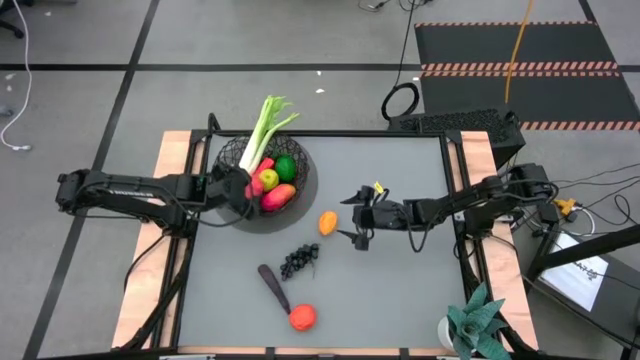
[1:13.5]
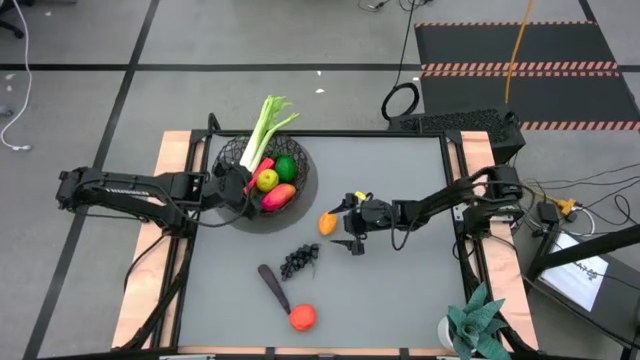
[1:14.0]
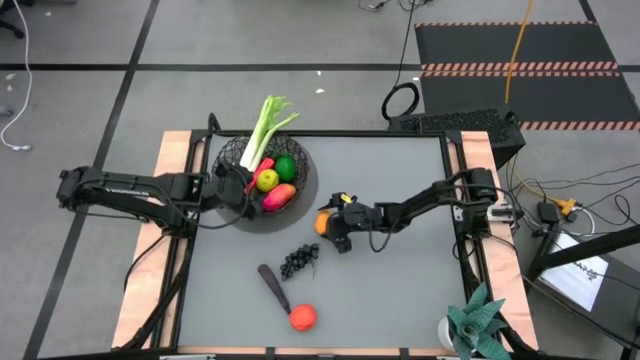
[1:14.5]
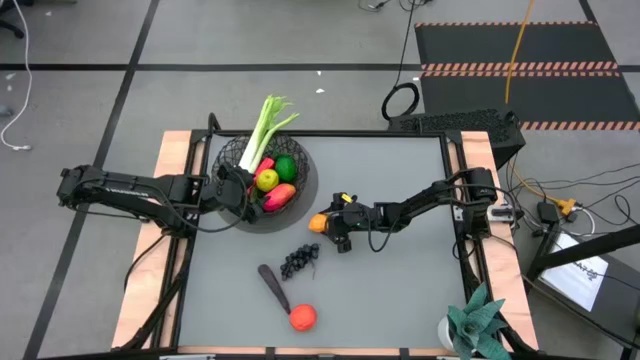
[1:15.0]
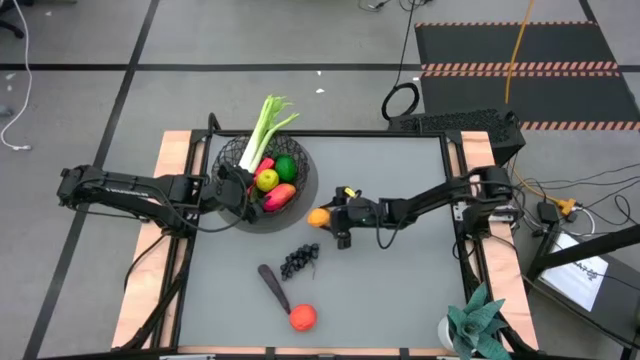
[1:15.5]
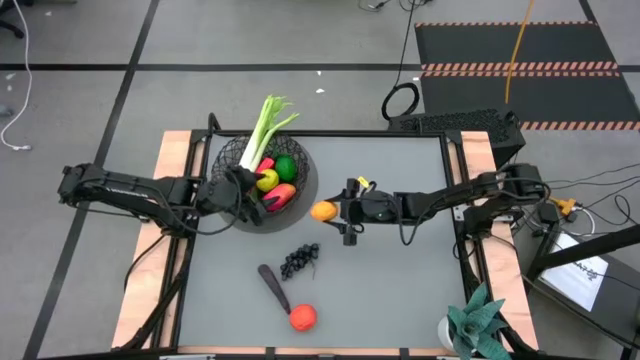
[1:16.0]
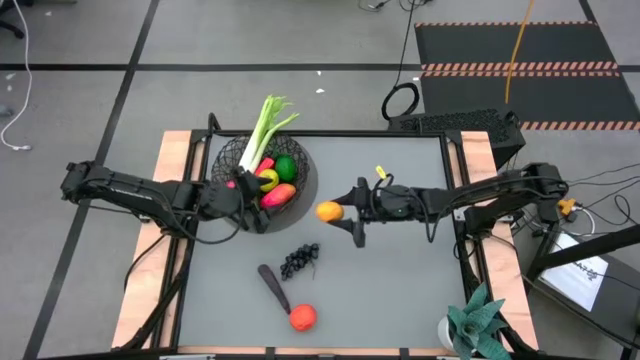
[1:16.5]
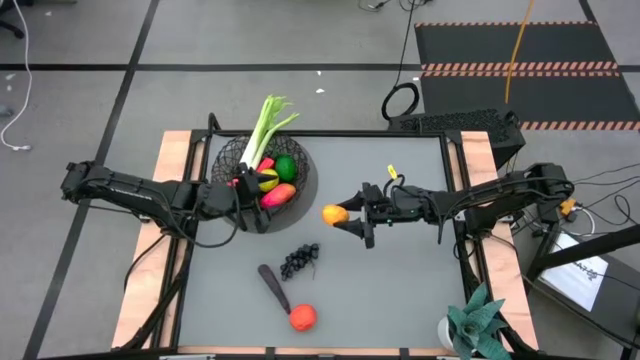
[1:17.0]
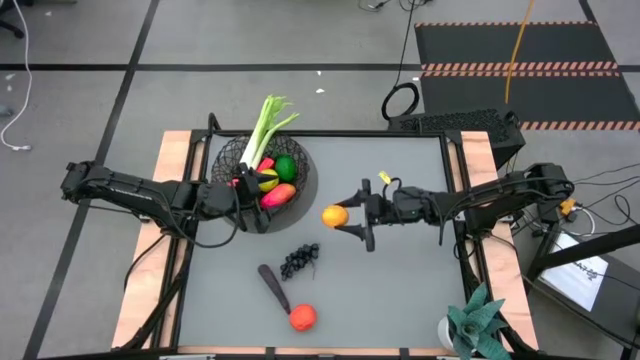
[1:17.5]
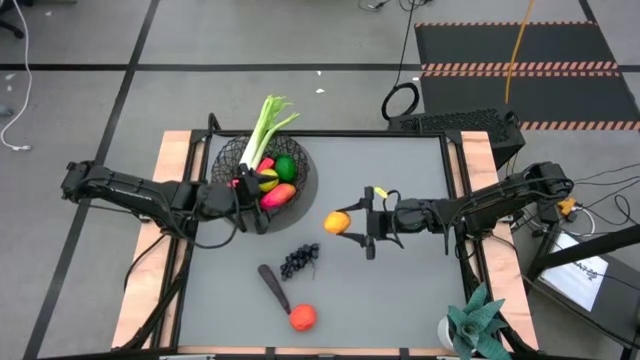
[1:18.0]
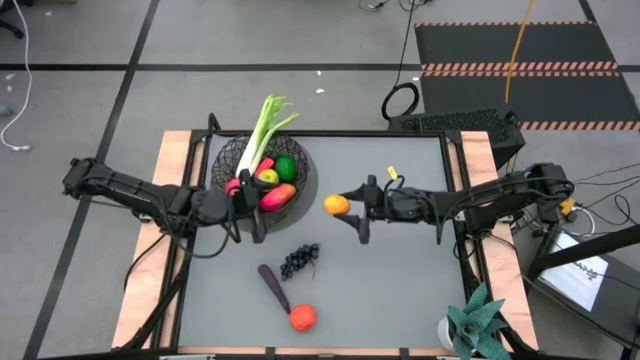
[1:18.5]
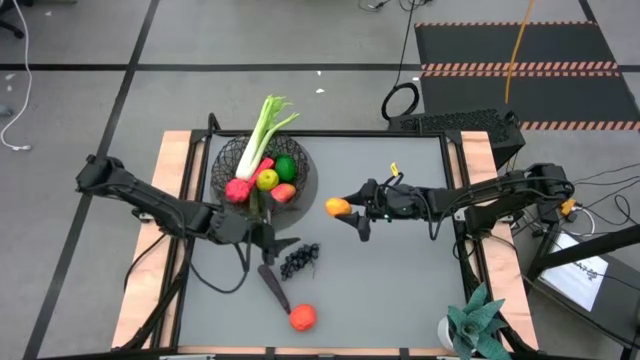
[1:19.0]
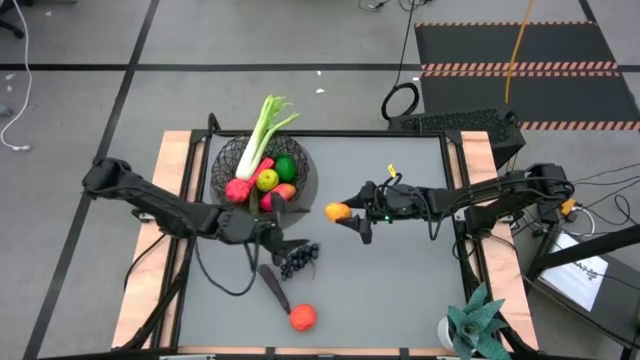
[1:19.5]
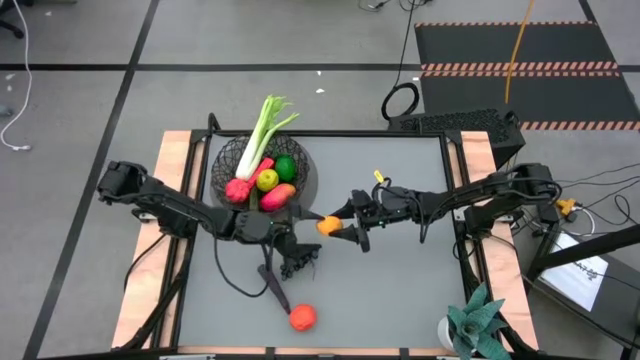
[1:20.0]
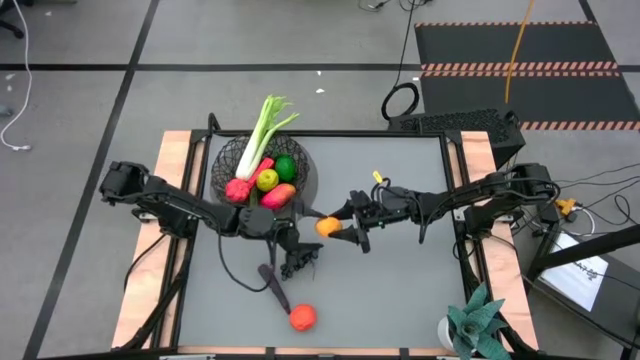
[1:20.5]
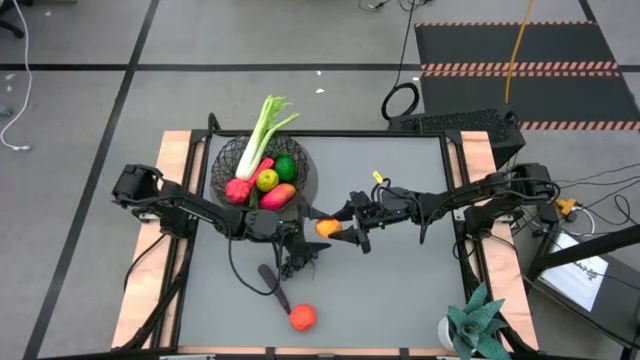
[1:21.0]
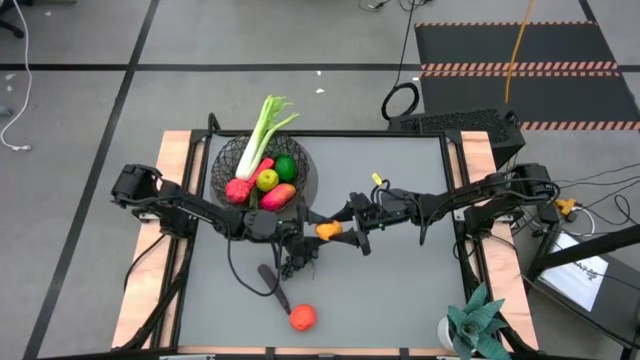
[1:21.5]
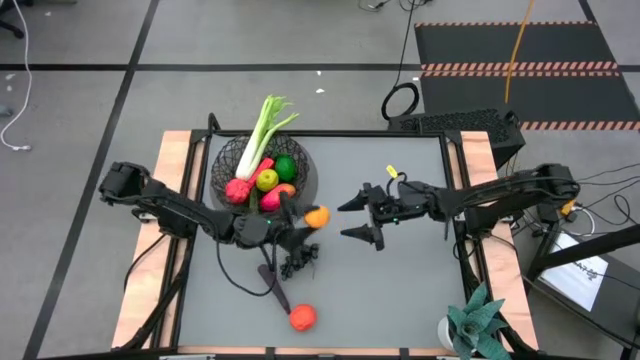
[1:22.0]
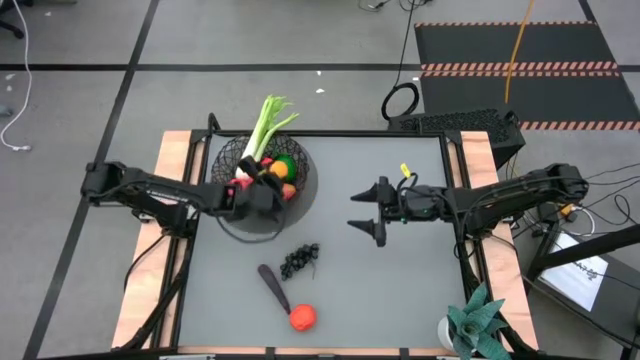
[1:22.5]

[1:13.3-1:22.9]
Task: Build produce basket
Put the yellow lemon into the wire basket

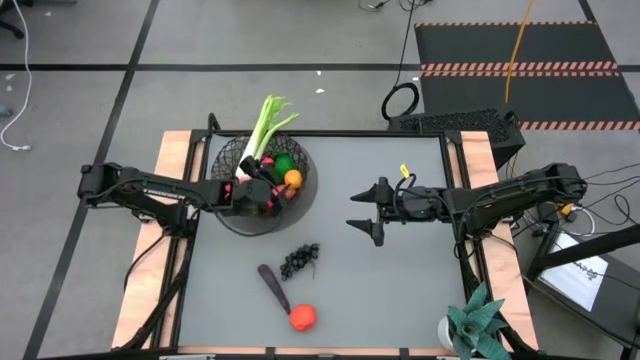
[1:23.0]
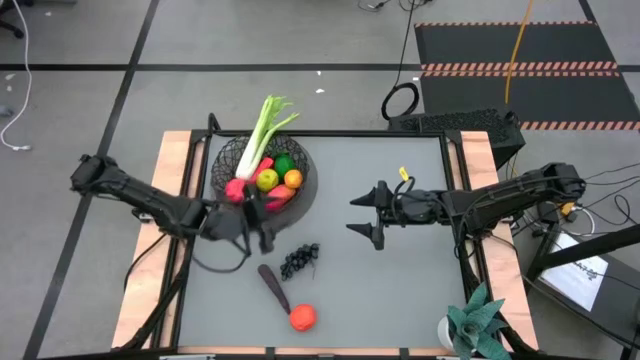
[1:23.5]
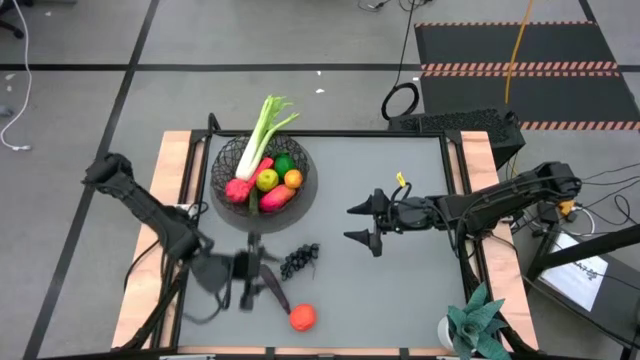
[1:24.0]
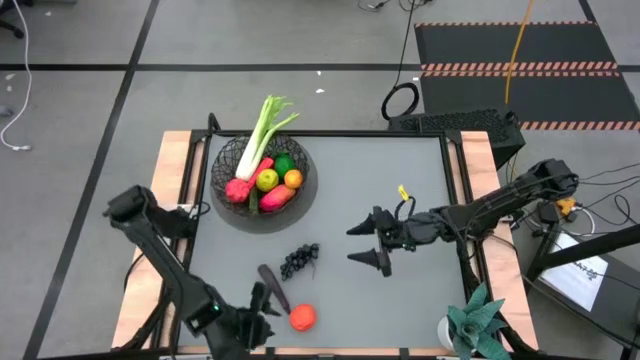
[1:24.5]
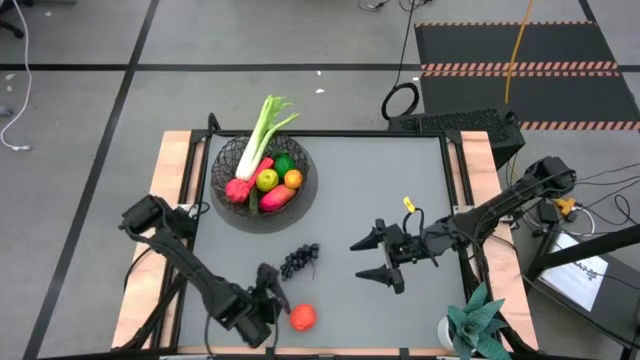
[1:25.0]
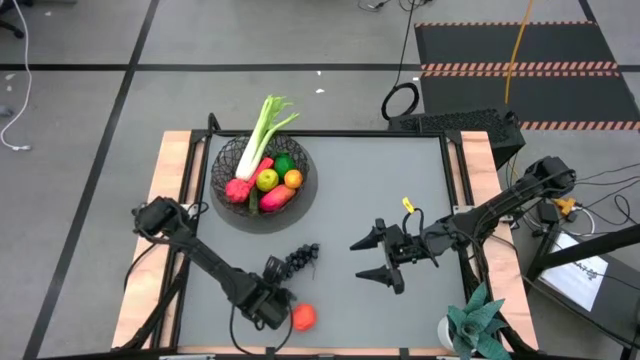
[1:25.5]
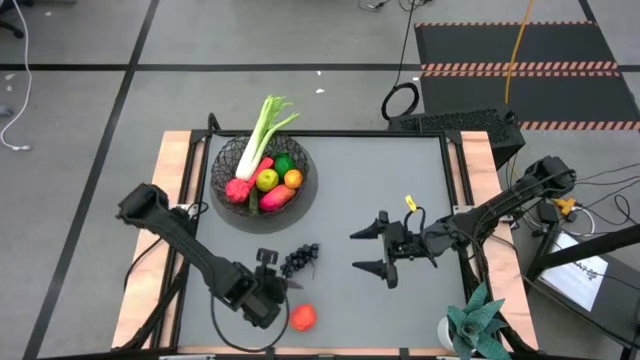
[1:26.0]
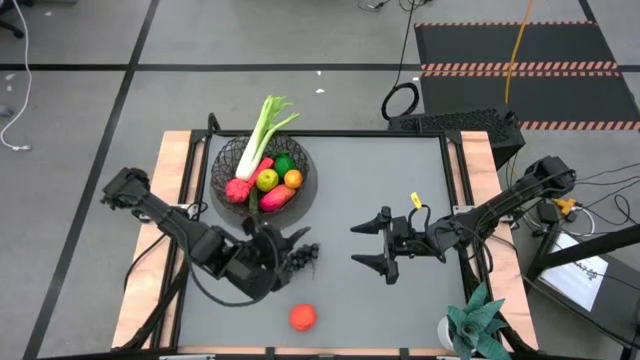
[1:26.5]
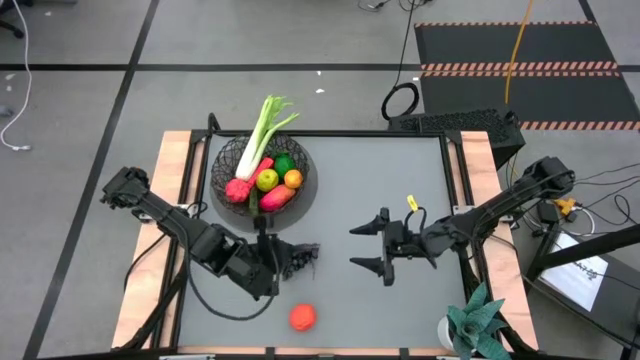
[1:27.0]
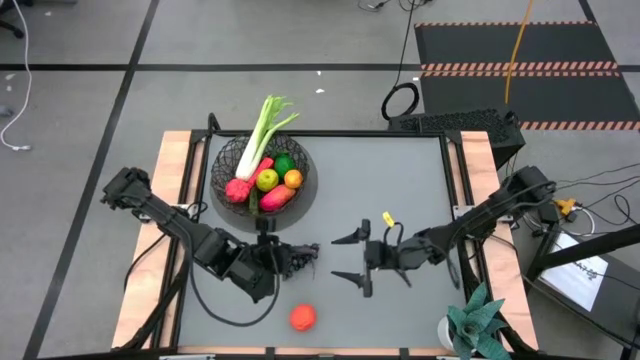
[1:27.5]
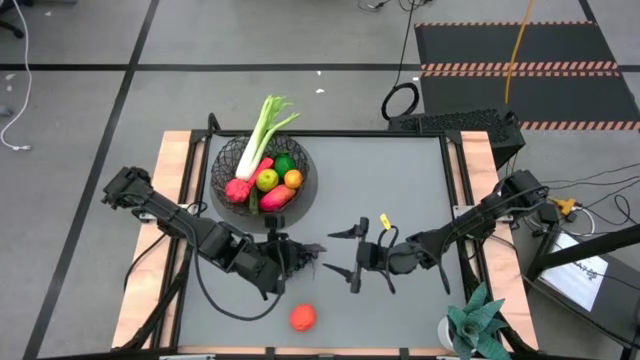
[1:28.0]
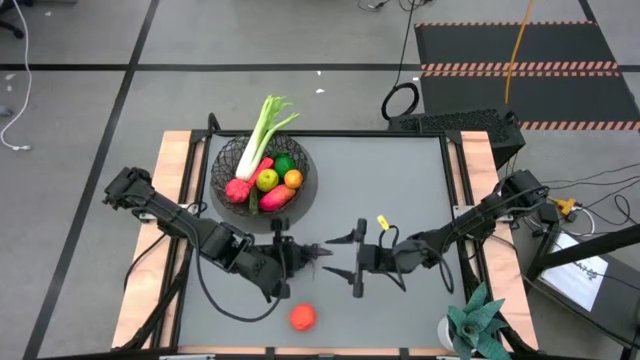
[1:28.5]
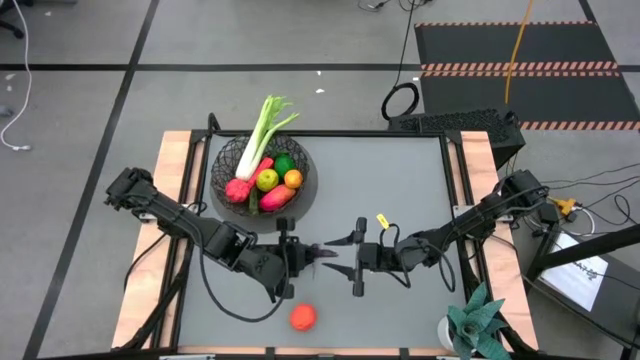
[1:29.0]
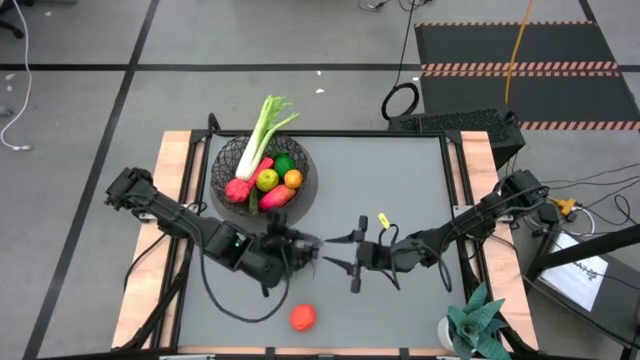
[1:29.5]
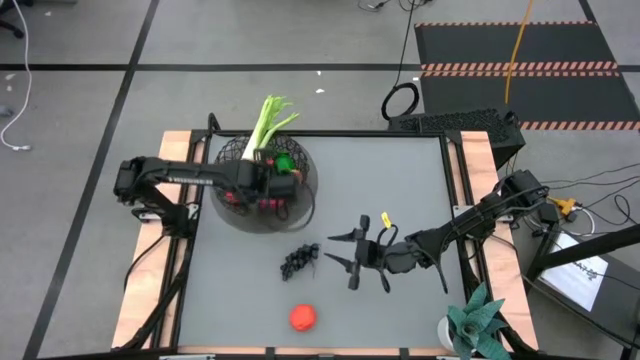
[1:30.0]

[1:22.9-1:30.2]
Put the eggplant into the wire basket

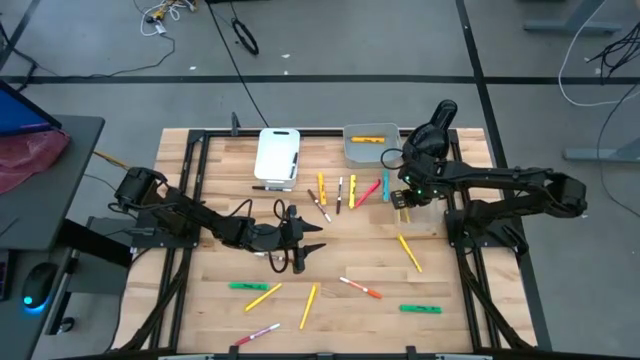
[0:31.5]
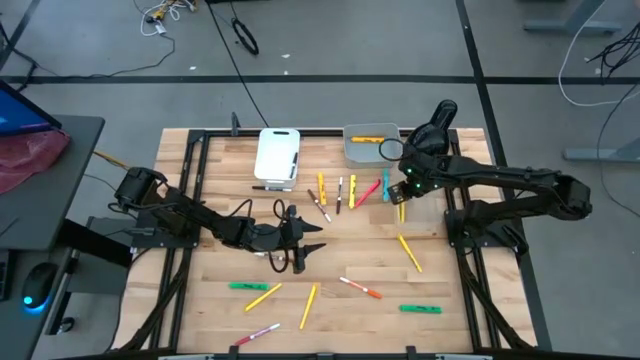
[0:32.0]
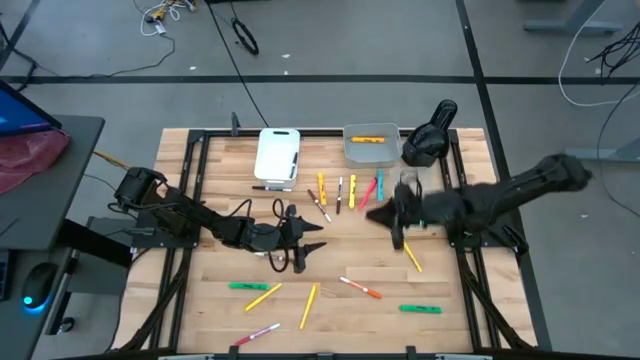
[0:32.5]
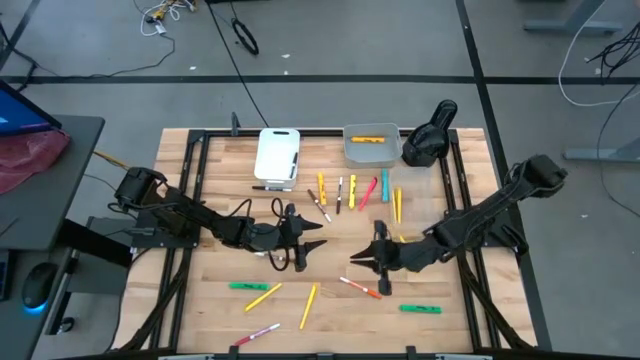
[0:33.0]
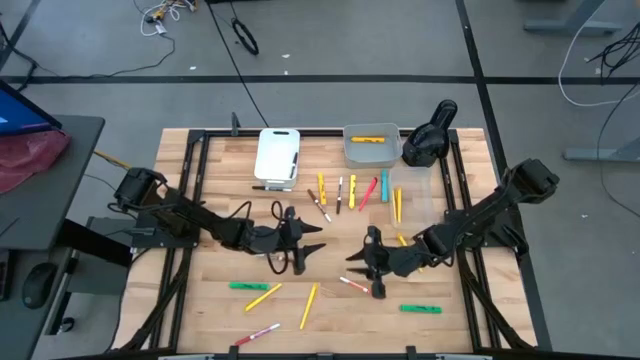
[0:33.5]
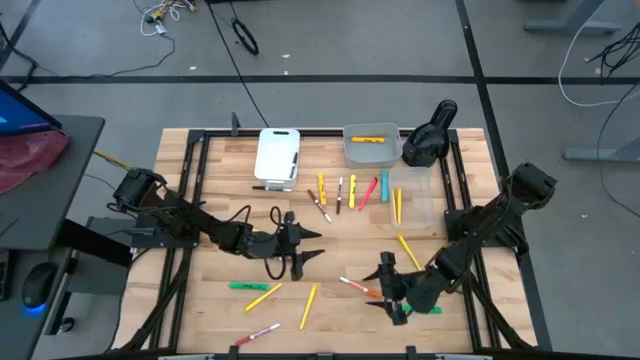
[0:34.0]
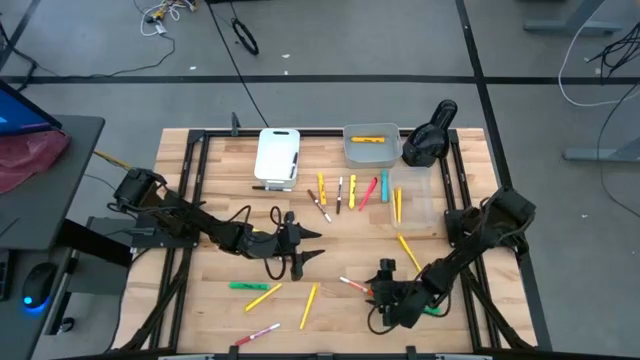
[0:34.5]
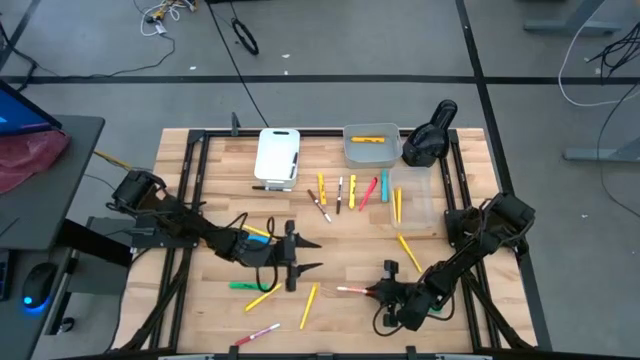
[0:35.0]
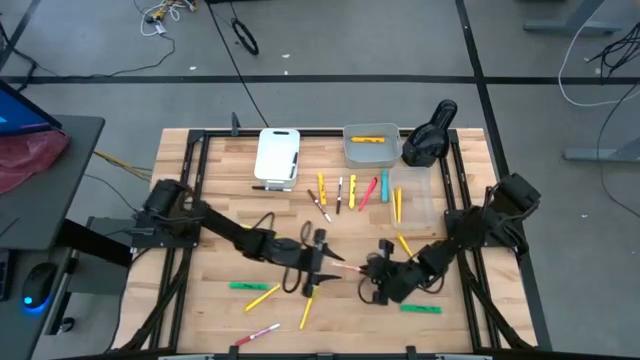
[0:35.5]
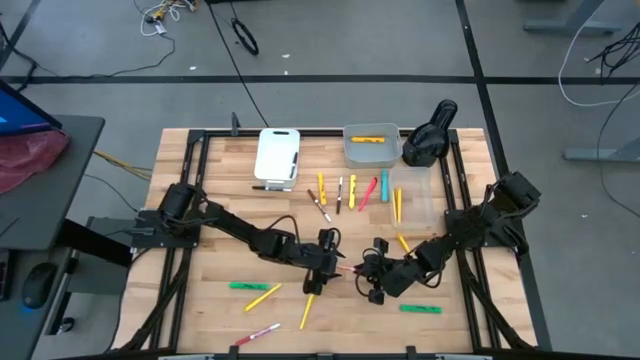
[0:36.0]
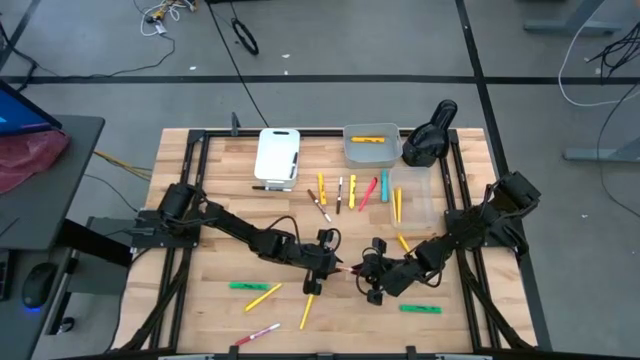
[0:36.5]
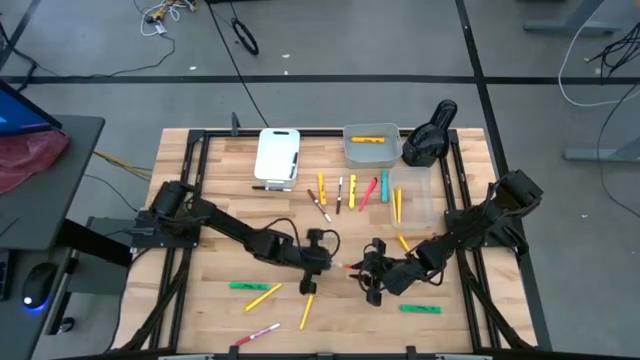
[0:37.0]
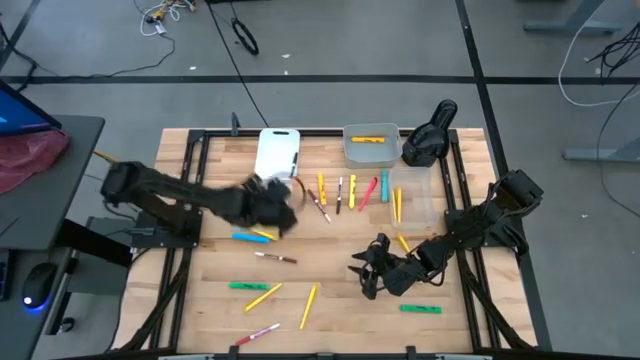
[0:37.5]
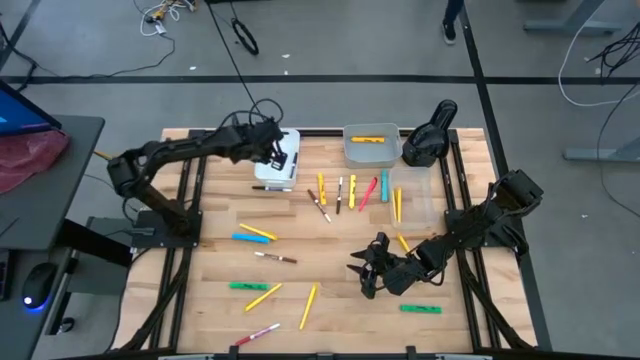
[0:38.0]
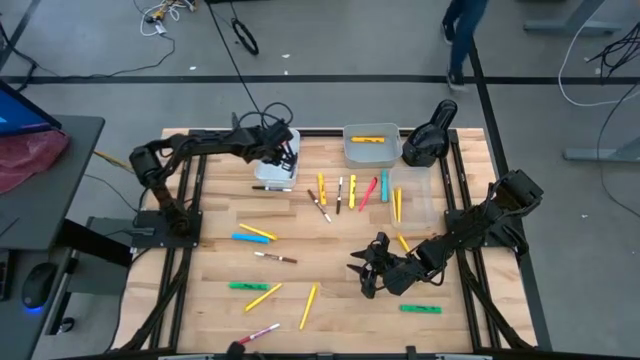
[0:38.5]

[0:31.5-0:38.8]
Task: Pick & Place Markers
Put the orange marker pen into the white bin
